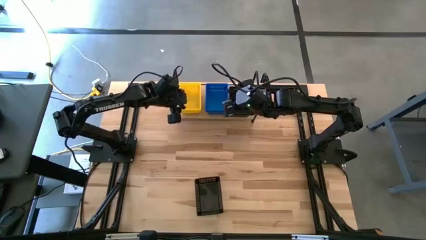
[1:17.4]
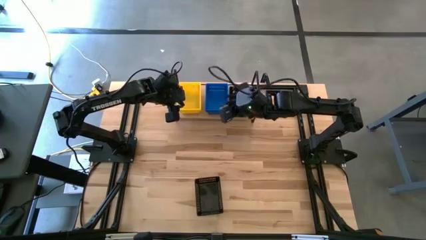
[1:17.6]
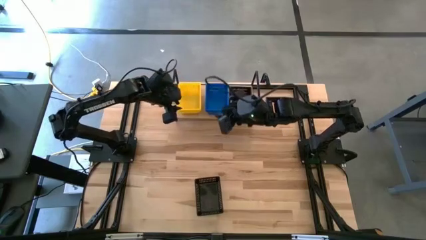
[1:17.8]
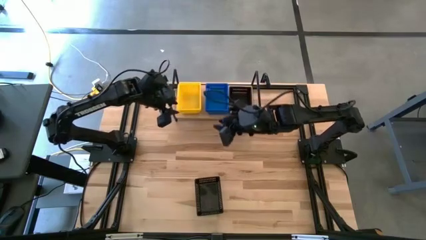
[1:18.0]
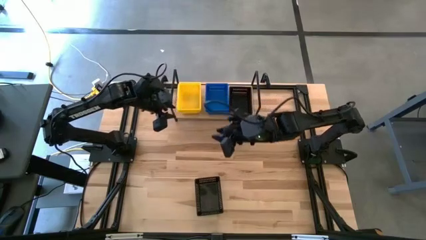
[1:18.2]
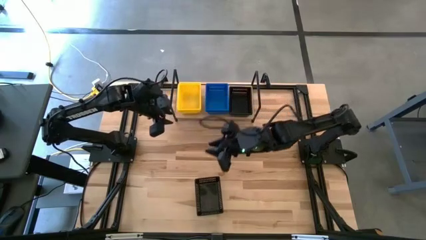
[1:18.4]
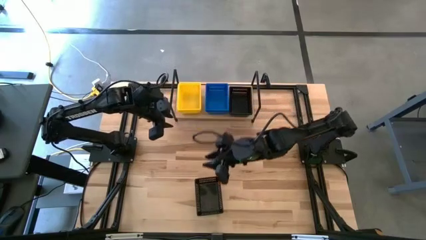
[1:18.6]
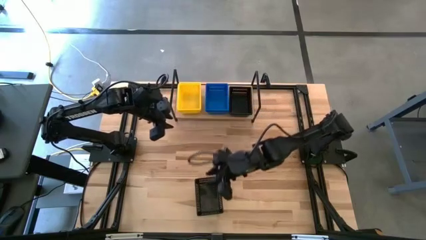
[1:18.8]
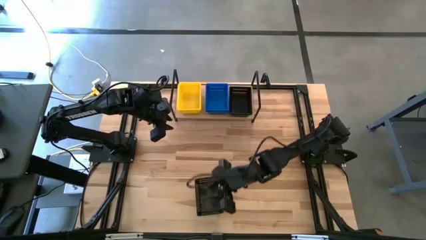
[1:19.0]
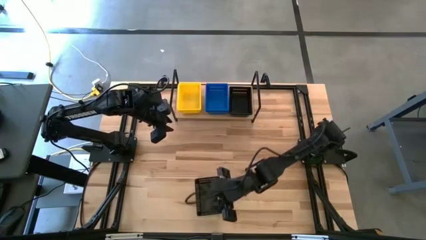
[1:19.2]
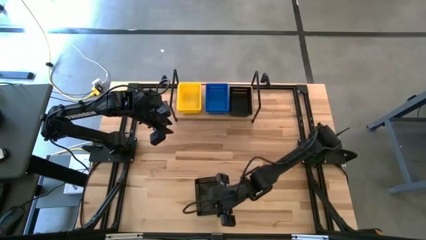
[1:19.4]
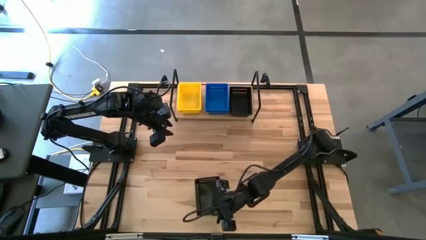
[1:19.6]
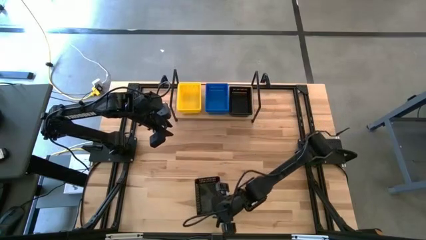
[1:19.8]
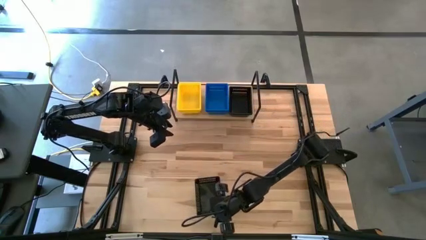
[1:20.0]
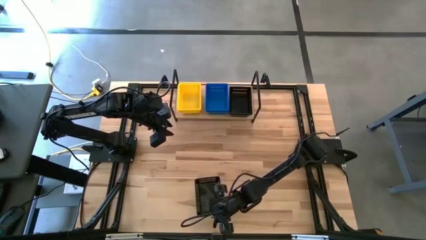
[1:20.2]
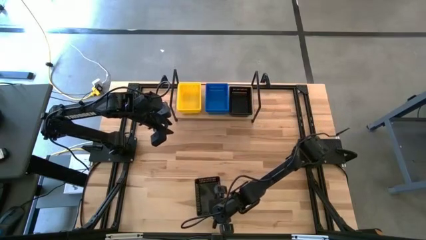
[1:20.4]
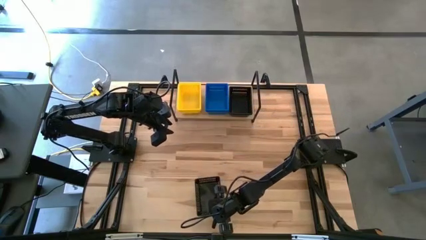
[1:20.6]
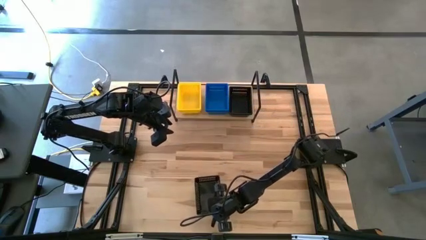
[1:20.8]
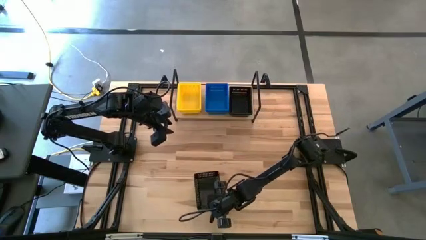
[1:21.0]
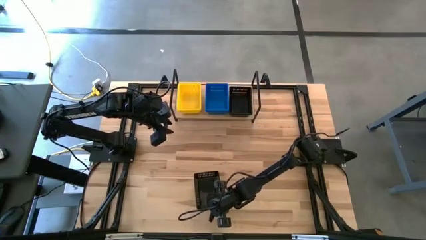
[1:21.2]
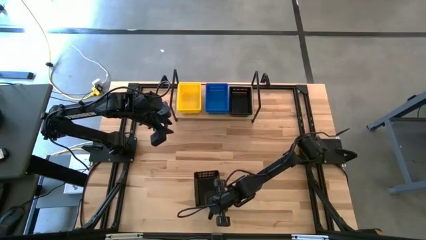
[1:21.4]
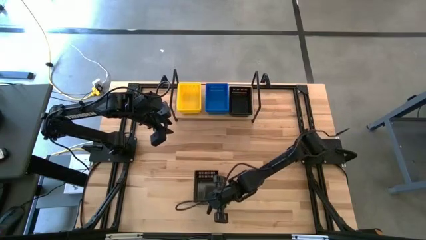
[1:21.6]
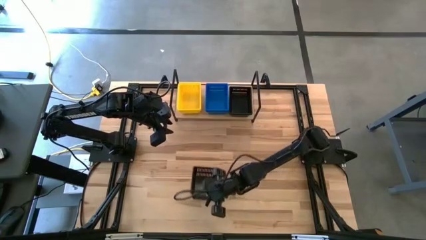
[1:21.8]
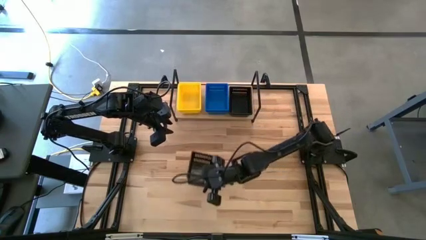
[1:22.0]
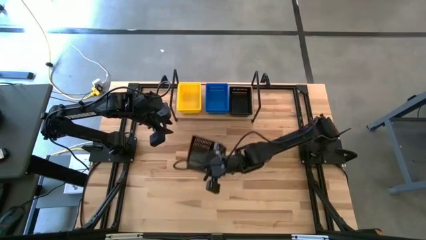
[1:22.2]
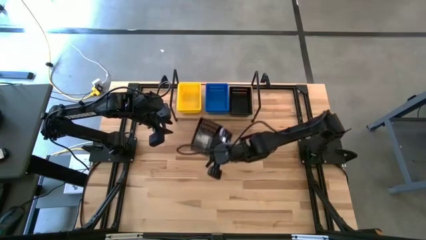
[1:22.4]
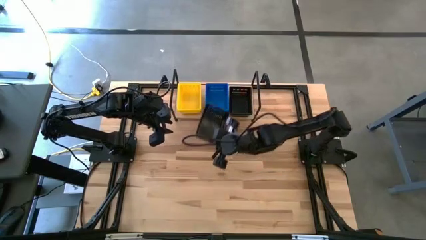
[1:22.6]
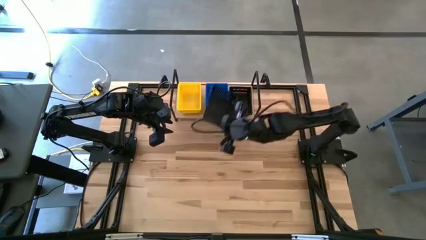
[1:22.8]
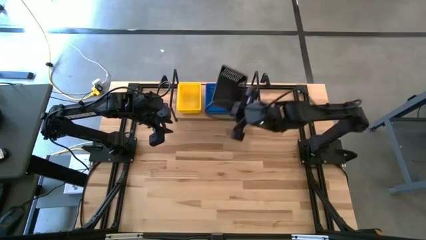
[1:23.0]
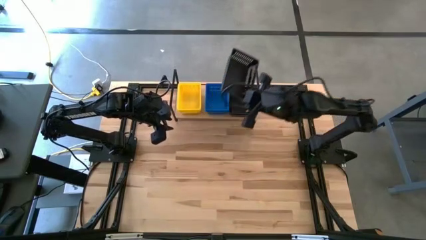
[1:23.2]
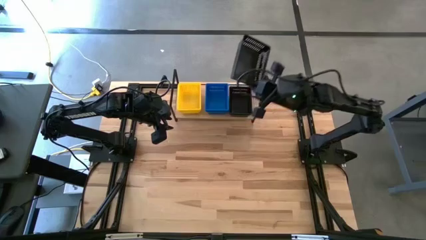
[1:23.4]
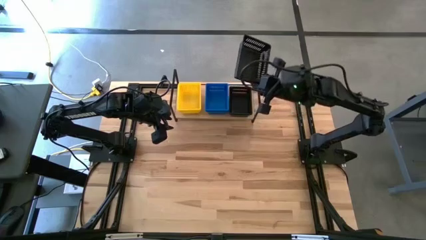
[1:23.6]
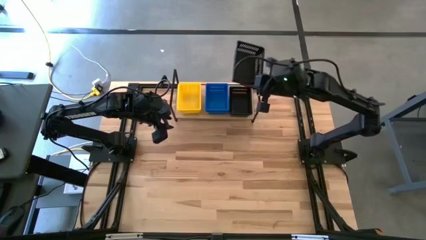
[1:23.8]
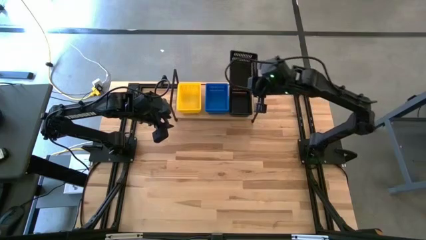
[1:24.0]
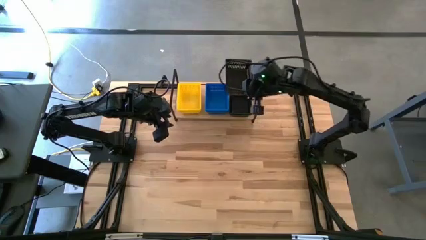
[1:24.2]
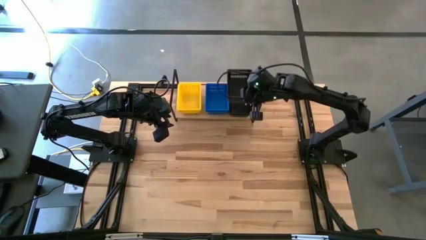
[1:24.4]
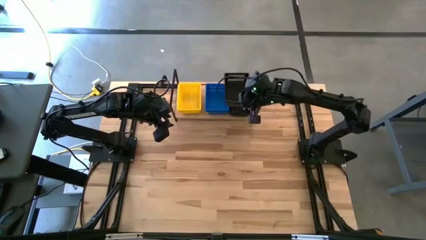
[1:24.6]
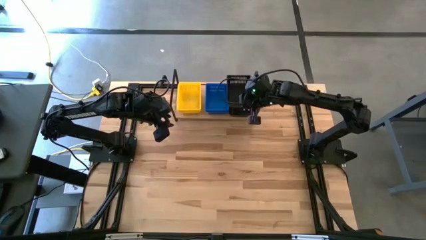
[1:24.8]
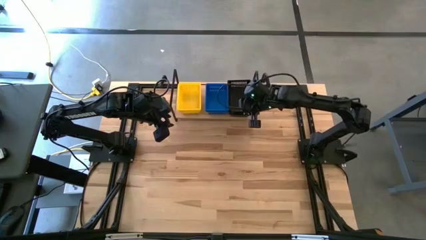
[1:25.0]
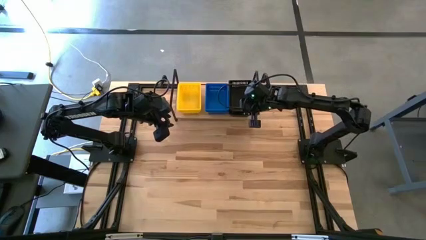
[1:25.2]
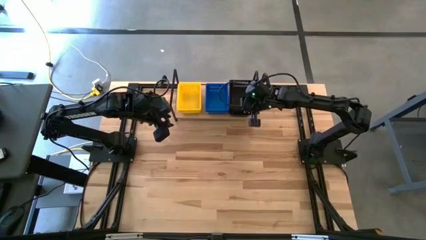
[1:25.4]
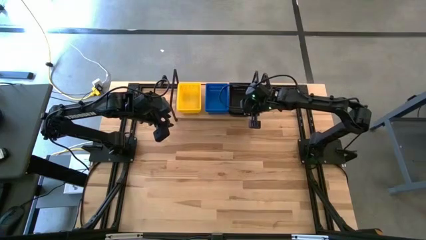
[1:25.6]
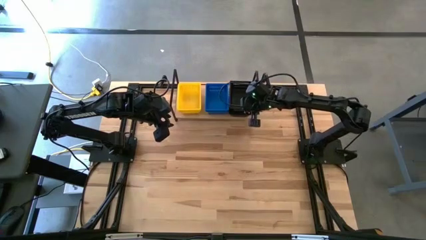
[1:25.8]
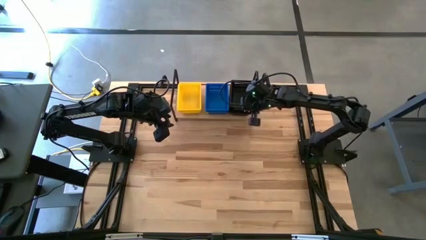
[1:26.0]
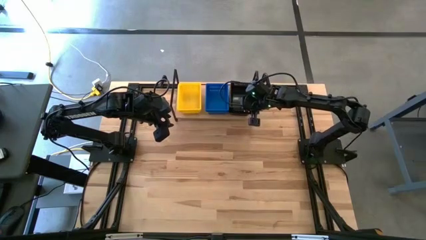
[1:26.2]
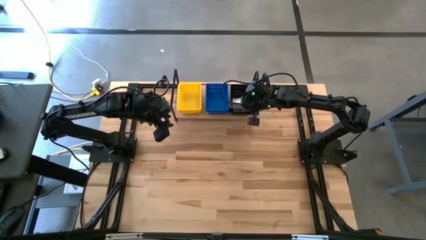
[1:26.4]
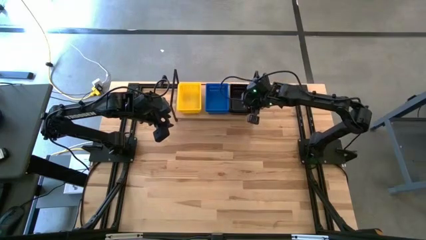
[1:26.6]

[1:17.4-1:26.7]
Task: Stack baskets on shelf by color
Stack the black bin on top of the black bin on the shelf

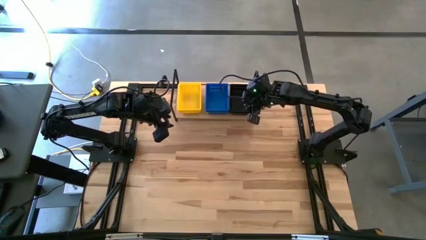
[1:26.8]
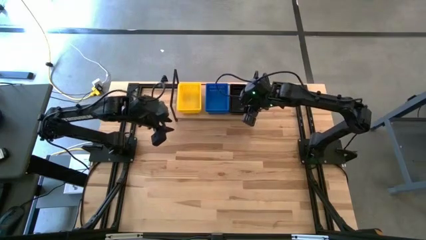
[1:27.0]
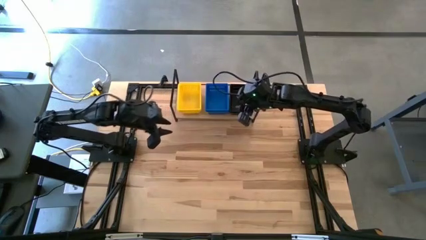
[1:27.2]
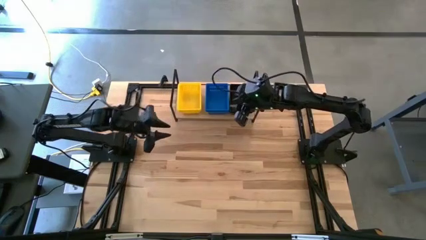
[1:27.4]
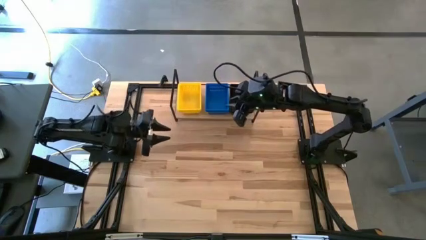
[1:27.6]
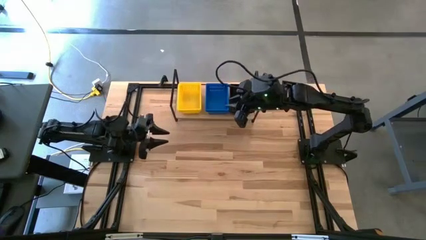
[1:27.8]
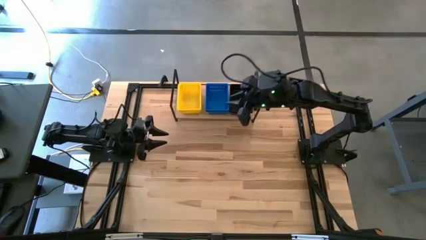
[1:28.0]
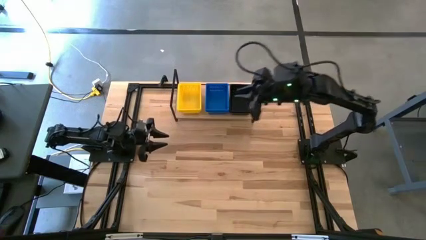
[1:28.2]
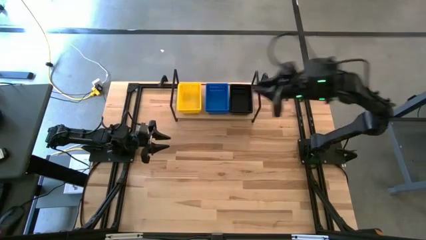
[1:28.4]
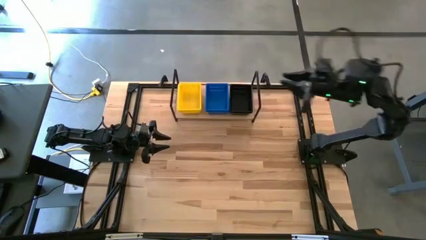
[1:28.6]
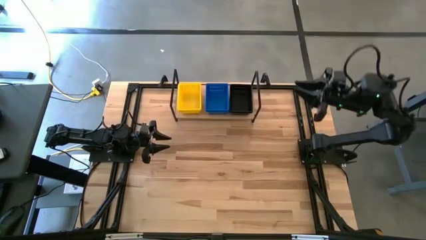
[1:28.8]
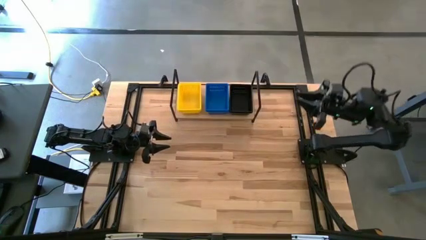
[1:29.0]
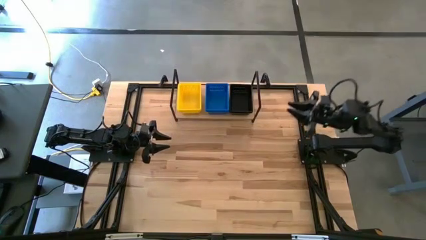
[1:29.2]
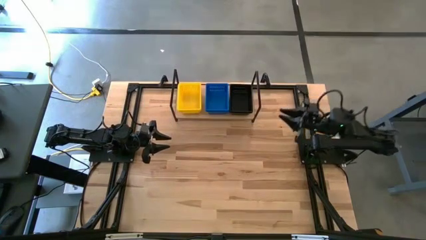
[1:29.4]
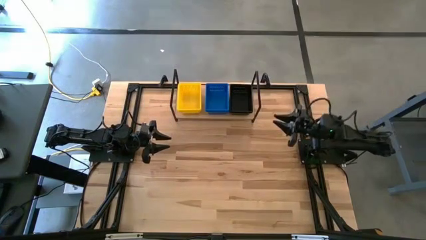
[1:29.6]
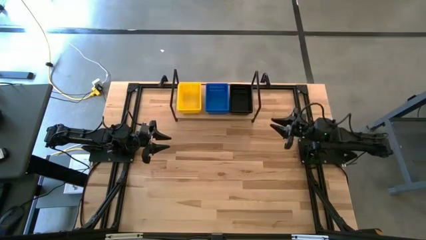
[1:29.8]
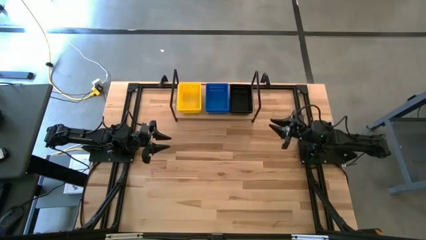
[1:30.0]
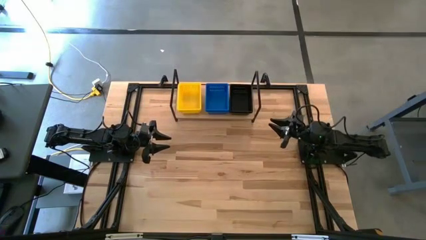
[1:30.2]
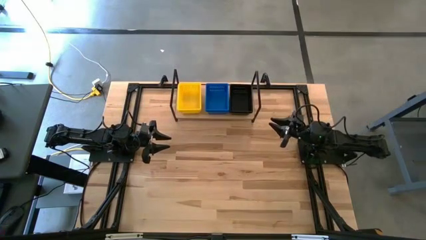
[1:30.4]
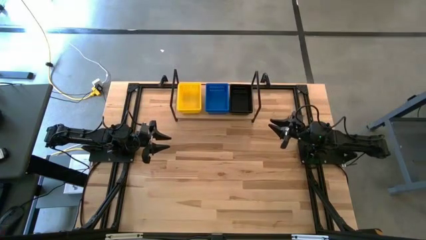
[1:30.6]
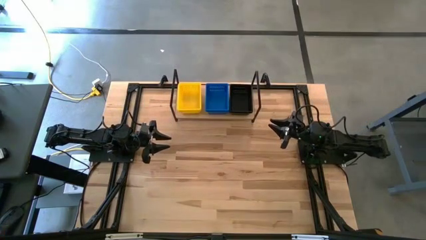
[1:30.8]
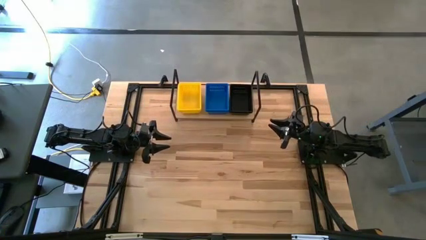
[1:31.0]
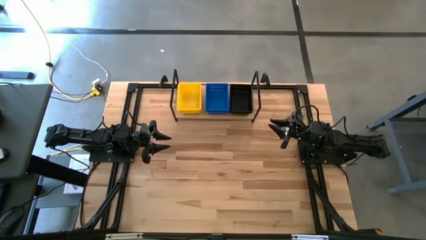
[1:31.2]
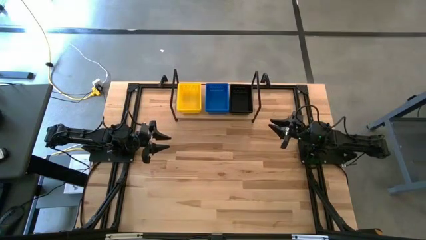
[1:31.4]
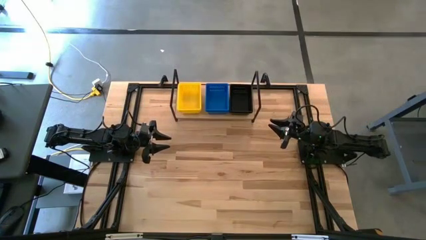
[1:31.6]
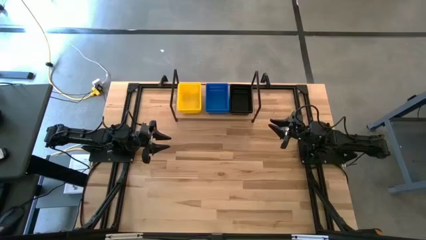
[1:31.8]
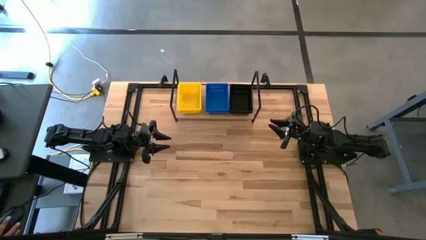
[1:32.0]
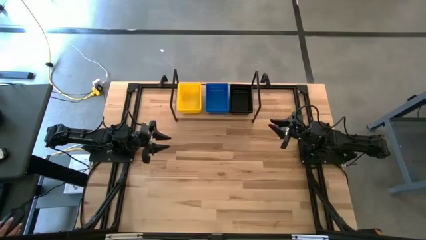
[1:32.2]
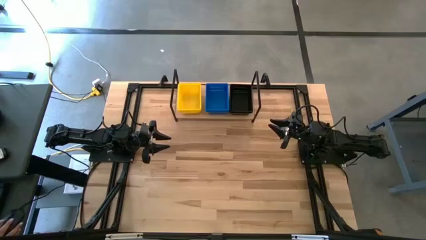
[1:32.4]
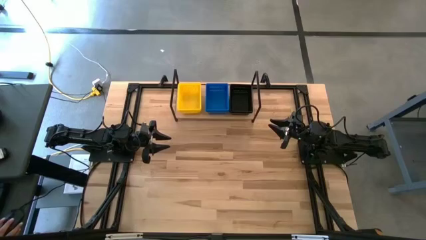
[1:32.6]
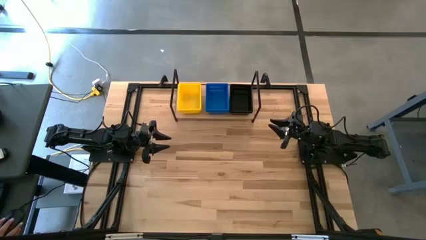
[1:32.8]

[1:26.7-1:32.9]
Return to Home Position
